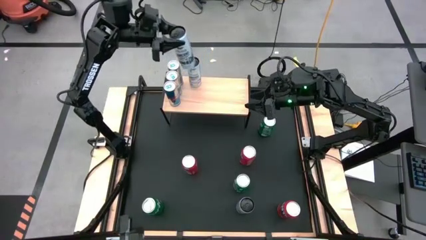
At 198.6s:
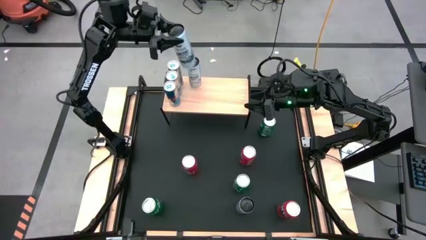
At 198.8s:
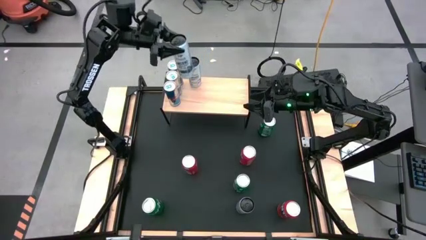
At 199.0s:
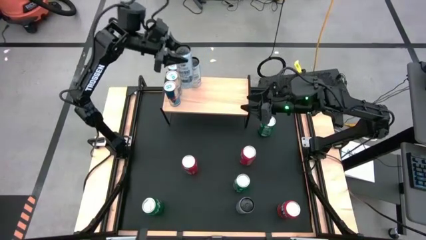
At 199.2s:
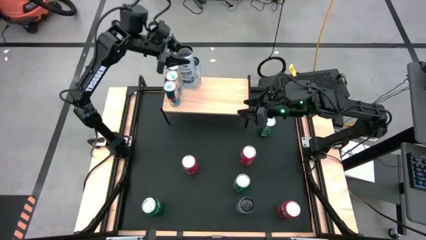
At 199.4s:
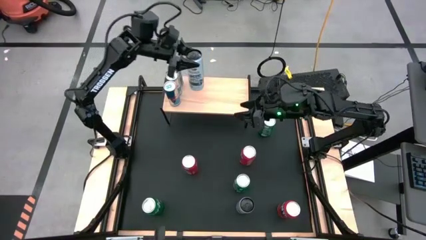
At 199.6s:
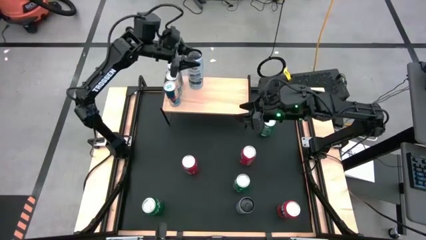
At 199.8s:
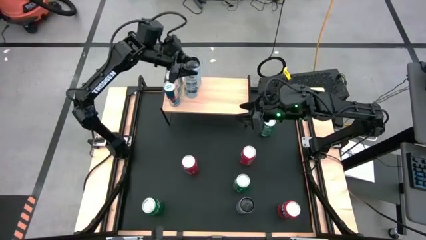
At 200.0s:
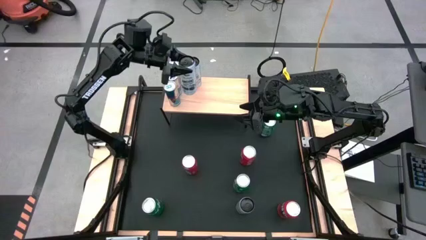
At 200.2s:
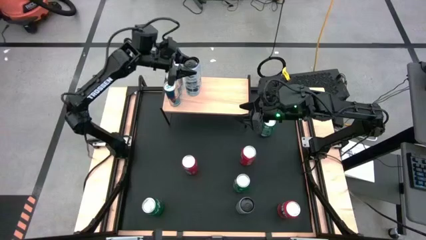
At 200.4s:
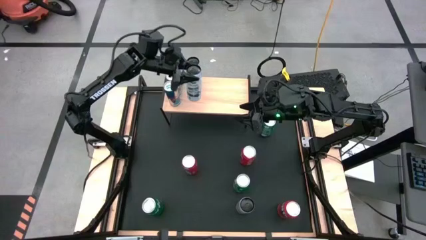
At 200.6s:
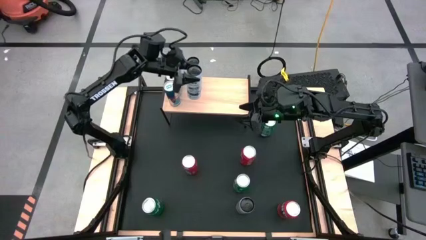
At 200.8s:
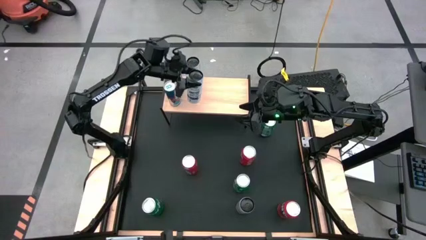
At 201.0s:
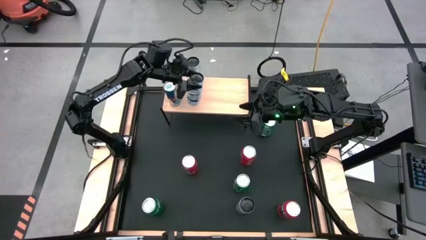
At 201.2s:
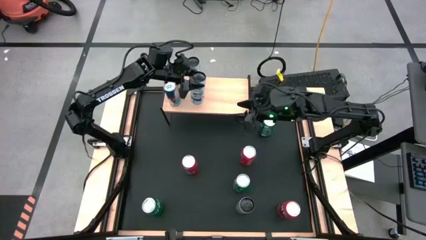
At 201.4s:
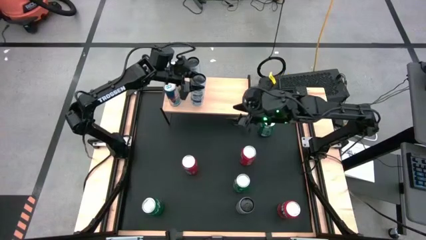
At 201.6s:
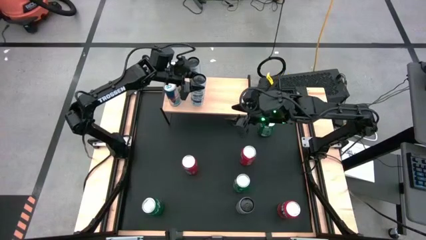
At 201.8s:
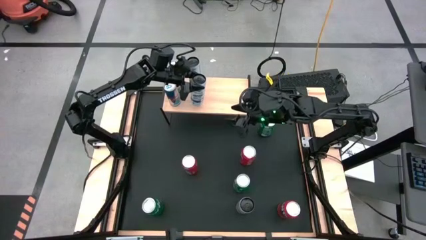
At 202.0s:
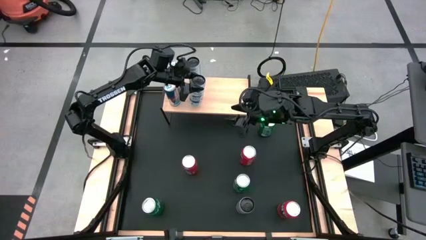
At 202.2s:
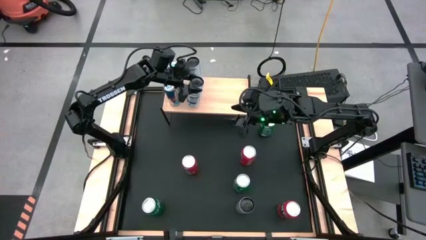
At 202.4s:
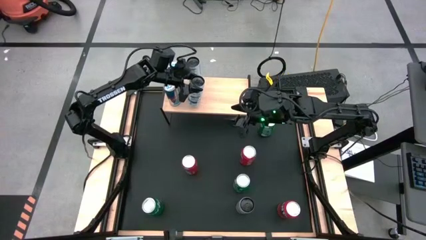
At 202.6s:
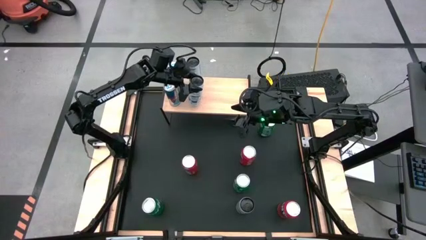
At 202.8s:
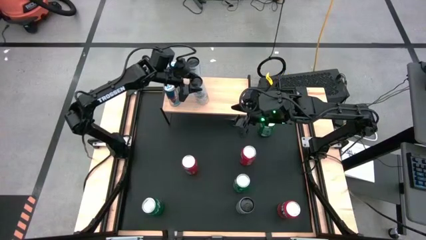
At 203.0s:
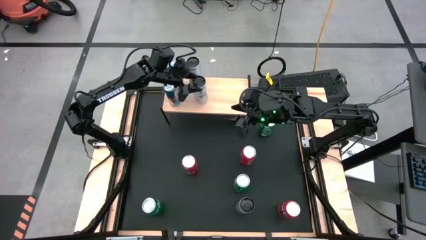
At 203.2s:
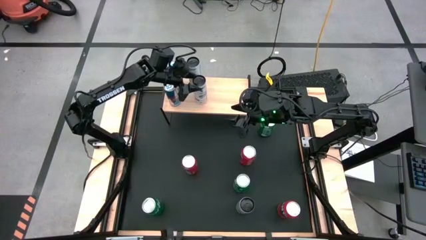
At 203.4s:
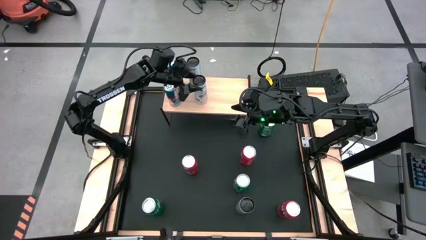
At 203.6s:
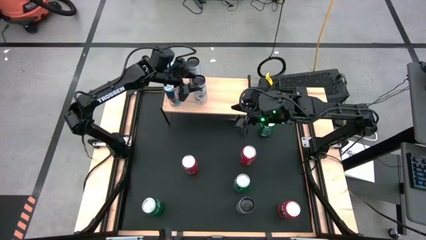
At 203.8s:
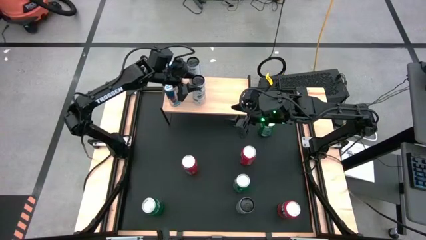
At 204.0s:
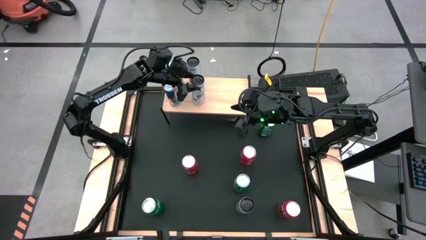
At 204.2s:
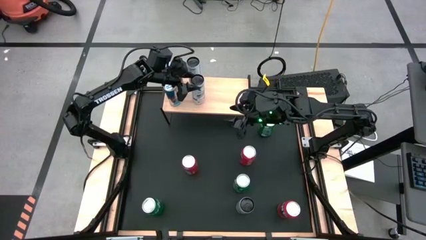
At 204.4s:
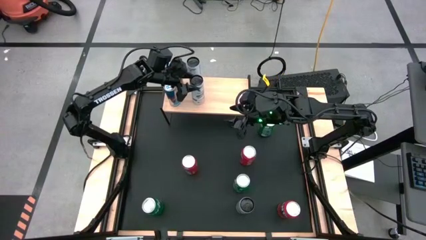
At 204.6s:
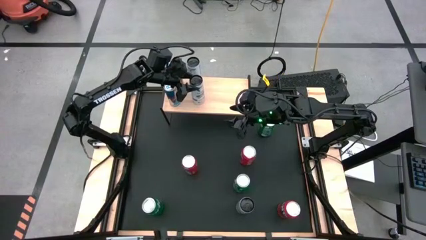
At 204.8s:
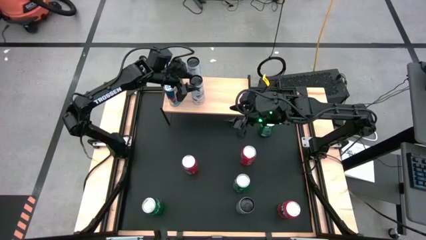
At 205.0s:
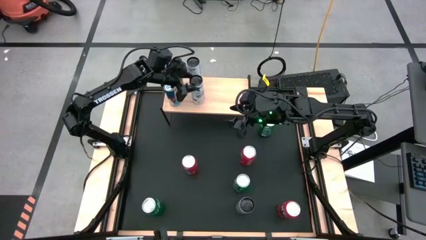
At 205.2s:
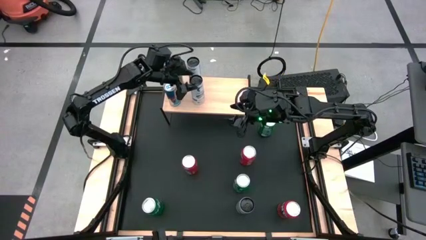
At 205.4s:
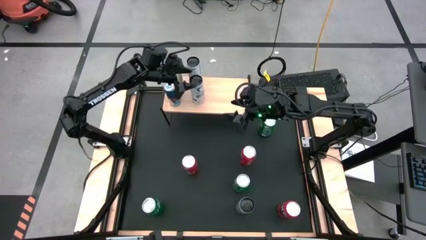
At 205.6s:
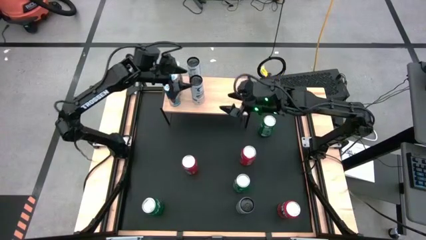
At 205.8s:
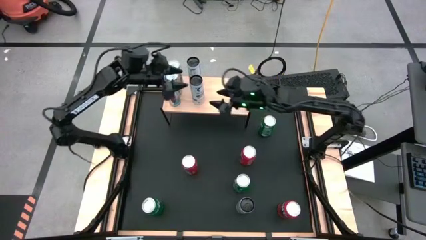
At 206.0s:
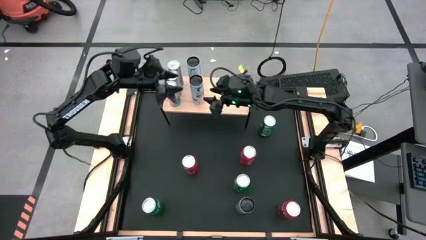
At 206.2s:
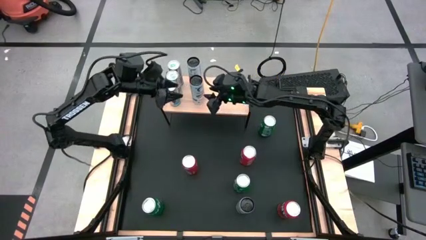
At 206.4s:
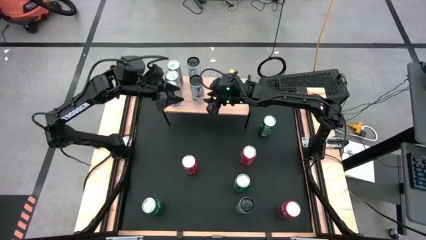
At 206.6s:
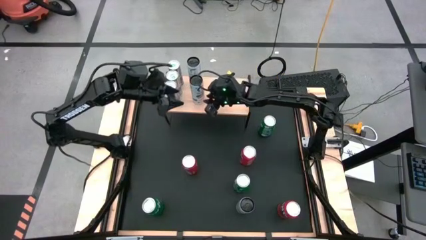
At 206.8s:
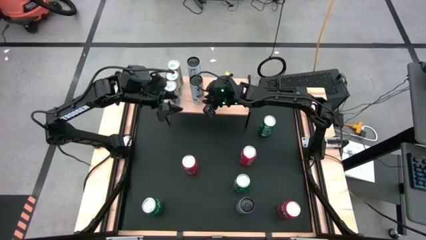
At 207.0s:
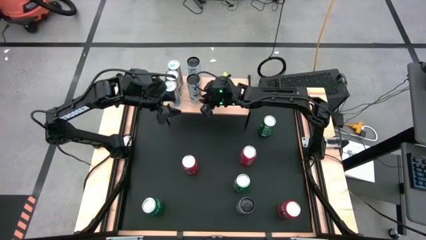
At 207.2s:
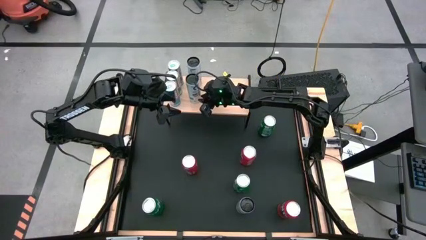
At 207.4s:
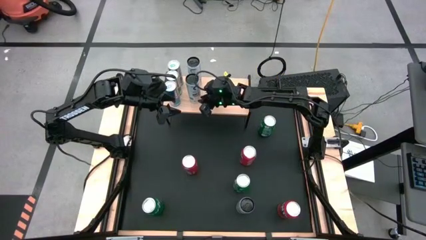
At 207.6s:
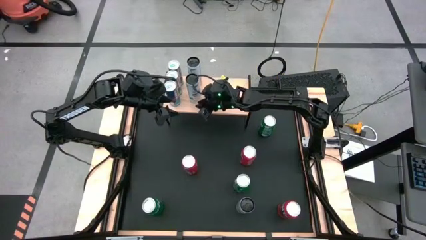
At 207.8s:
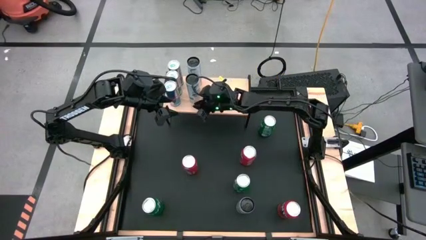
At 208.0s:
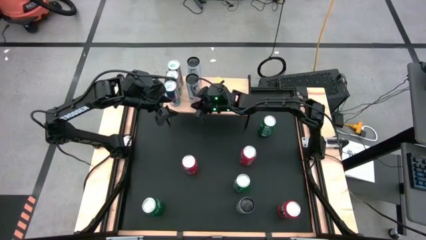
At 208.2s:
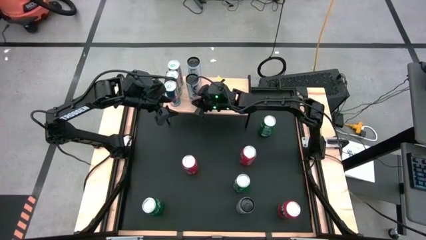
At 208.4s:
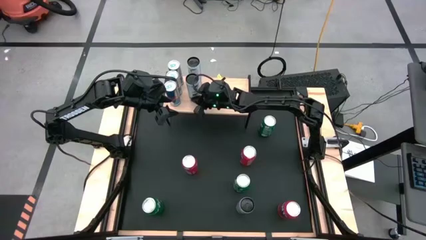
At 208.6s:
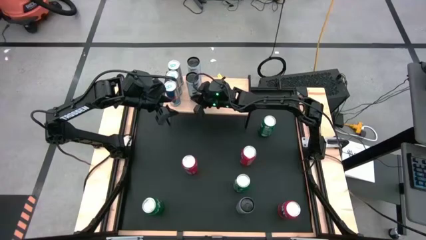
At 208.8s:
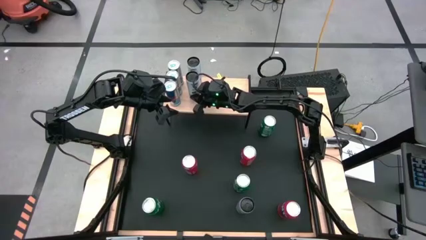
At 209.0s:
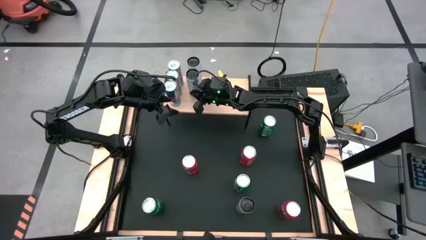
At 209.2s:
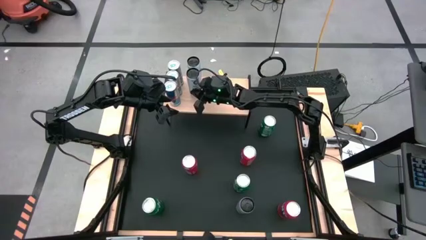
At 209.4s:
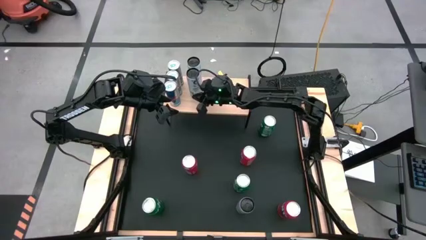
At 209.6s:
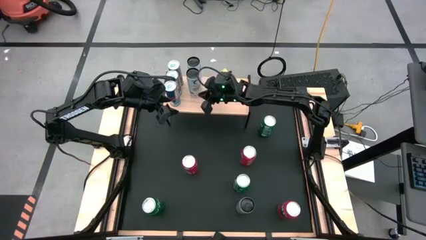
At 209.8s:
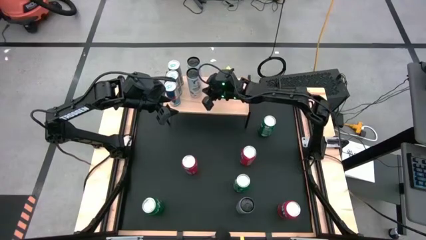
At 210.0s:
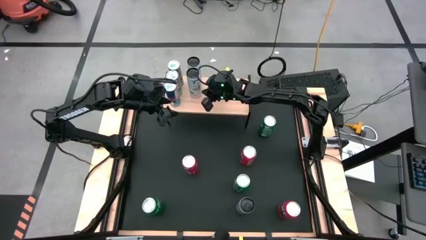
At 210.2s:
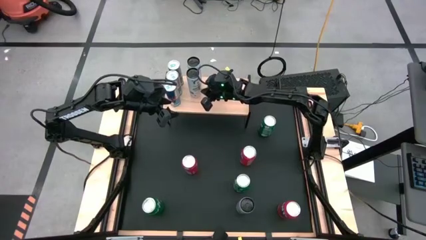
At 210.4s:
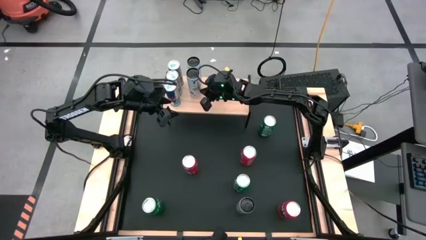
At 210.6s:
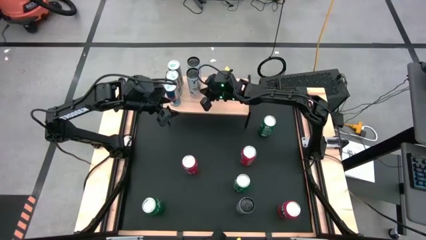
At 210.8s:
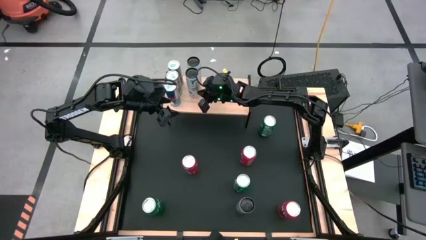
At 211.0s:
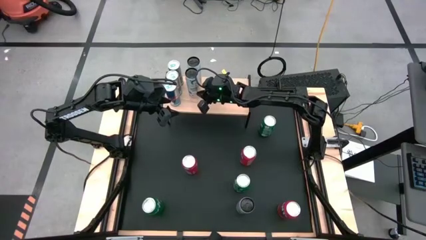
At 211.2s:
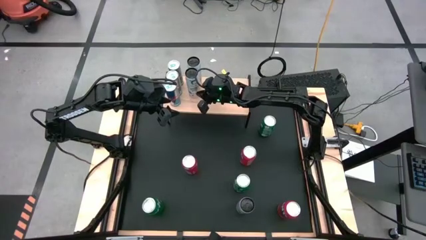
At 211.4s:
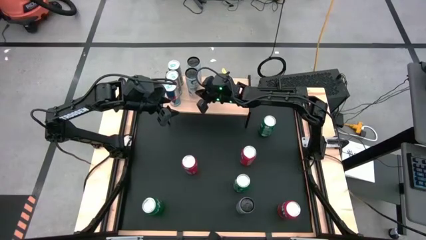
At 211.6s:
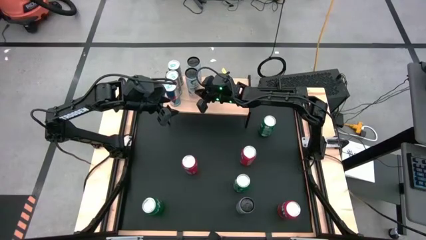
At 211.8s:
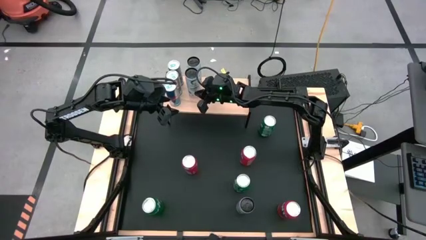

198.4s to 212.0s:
Task: Place canned beverage on shelf
Put the top white-blue soda can on the shelf

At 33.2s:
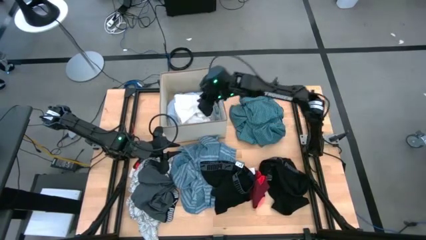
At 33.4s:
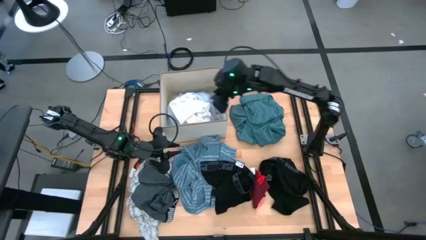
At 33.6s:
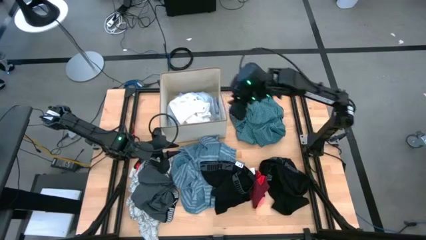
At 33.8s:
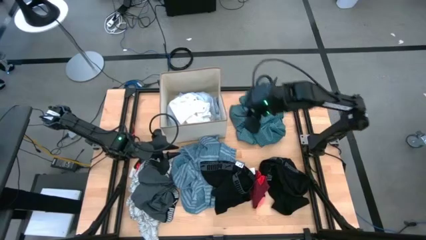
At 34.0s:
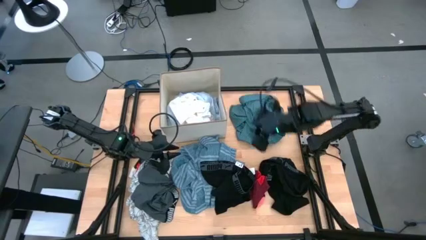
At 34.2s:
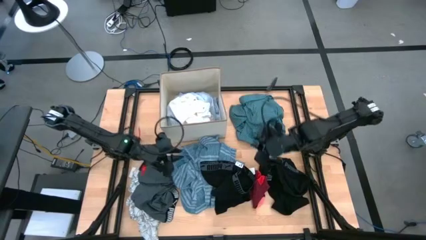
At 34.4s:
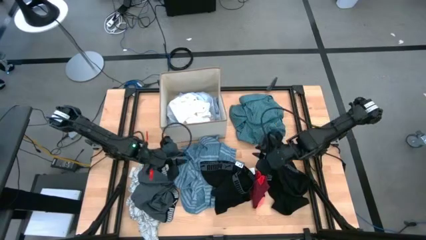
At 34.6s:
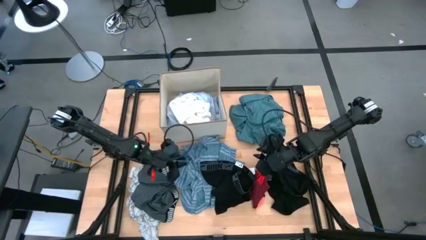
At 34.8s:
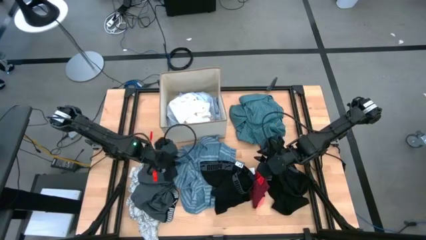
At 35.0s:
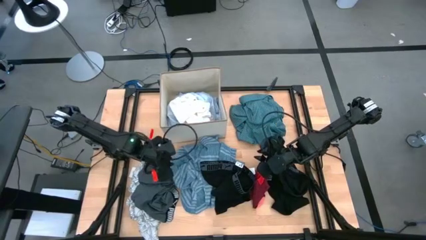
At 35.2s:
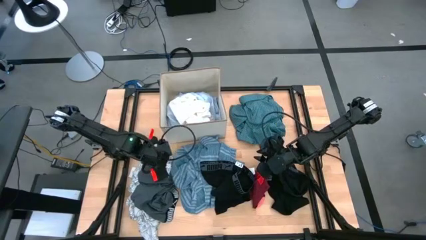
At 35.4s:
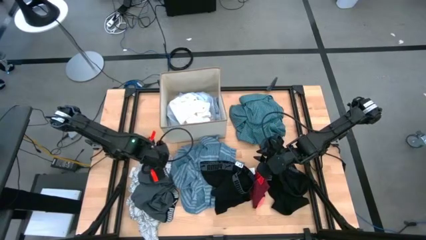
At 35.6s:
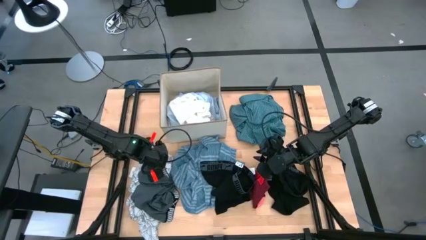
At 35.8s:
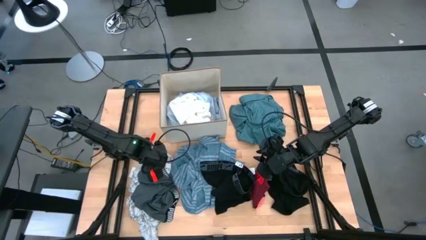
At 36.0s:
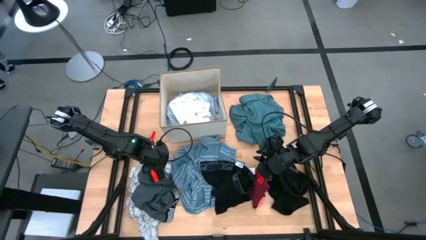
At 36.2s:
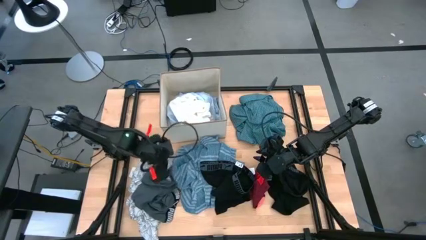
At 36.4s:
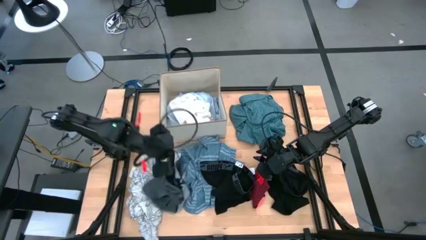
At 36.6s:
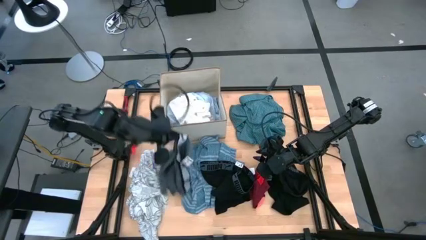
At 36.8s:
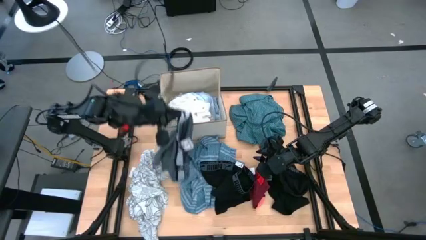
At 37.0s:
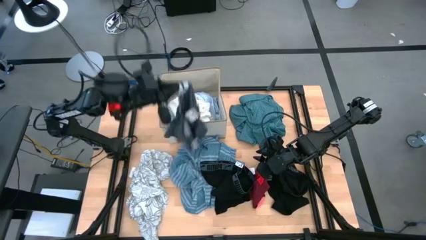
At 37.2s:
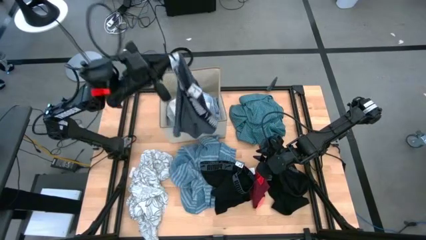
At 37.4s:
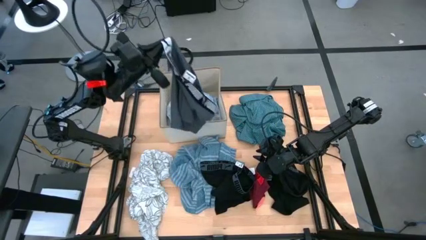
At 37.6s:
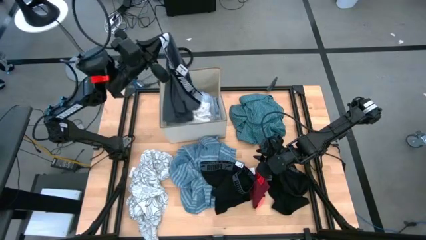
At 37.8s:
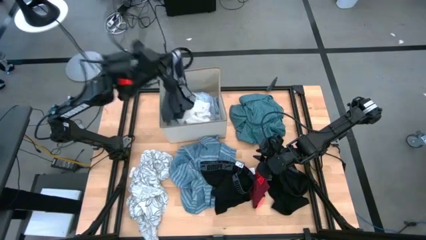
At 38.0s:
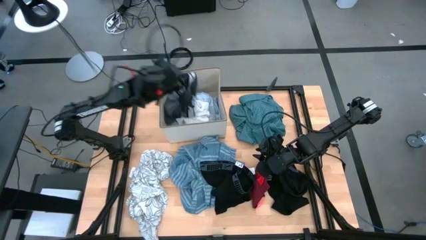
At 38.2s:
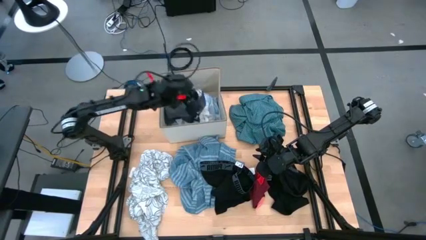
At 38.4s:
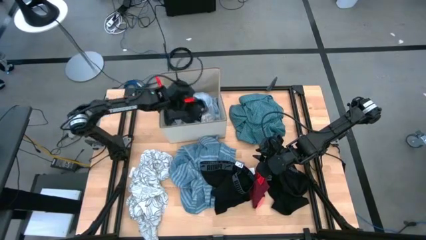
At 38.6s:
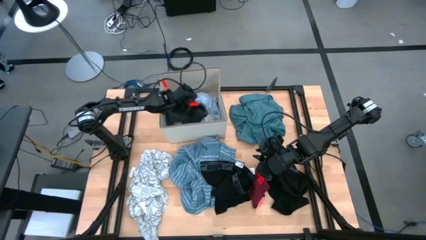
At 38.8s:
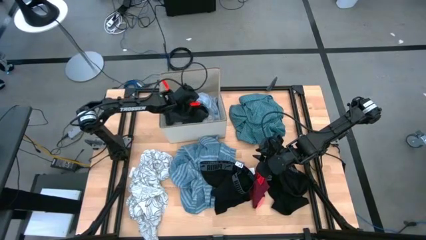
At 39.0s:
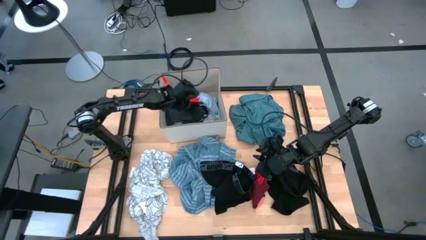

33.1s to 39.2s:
Task: Sort clothes
Put the gray underwear into the white laundry organizer
